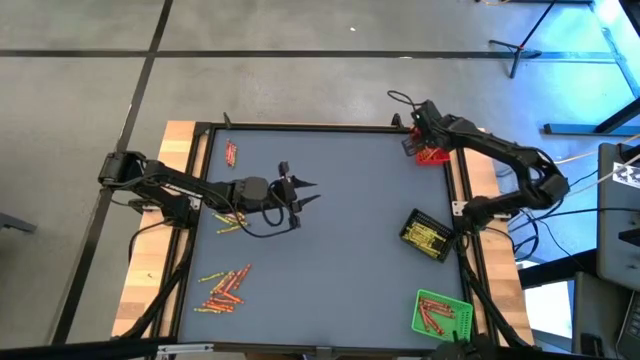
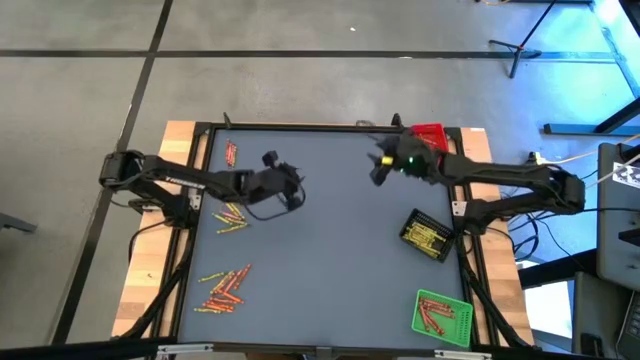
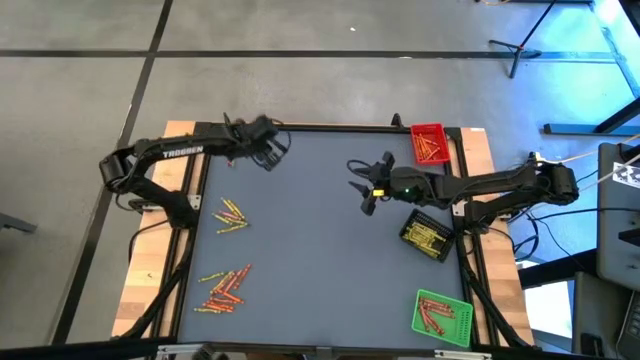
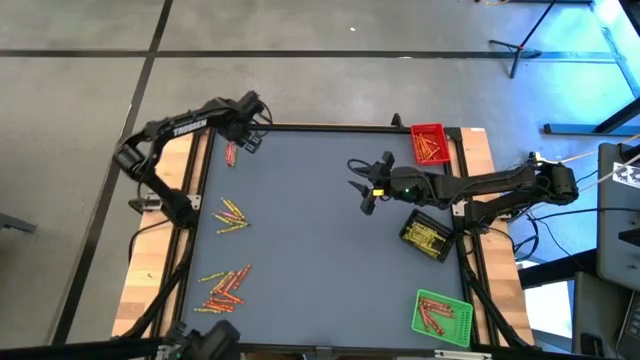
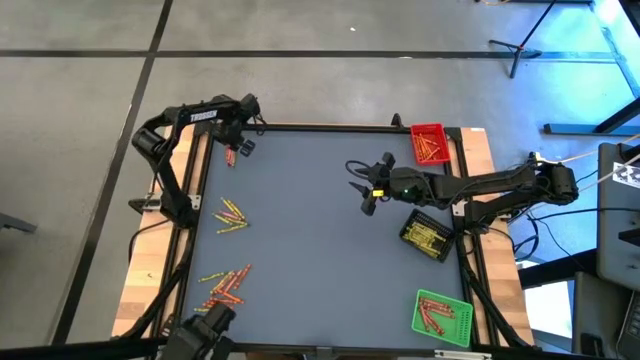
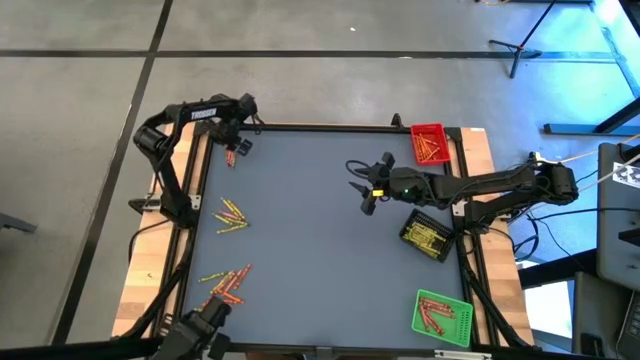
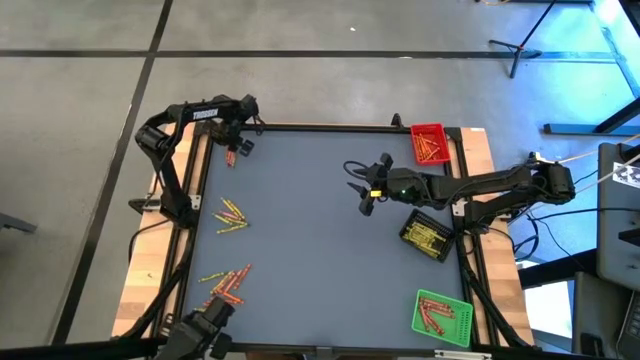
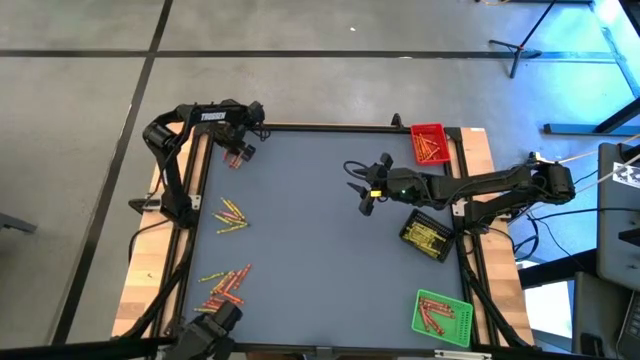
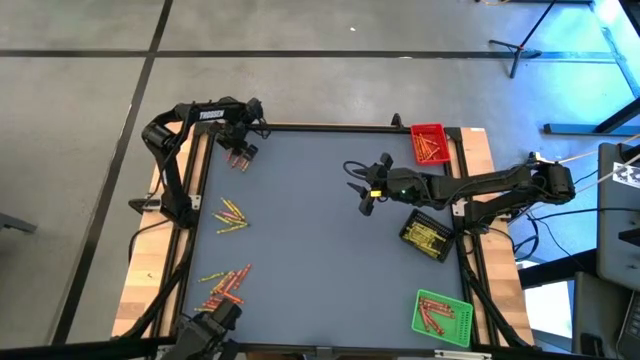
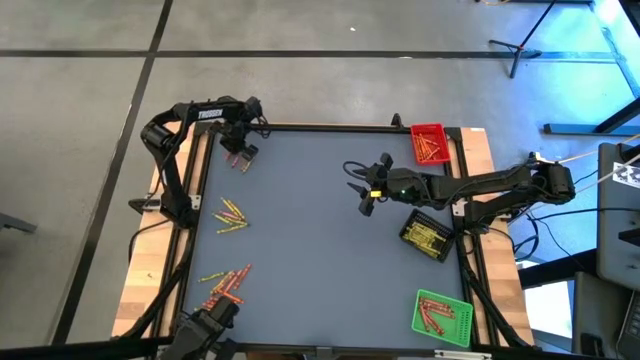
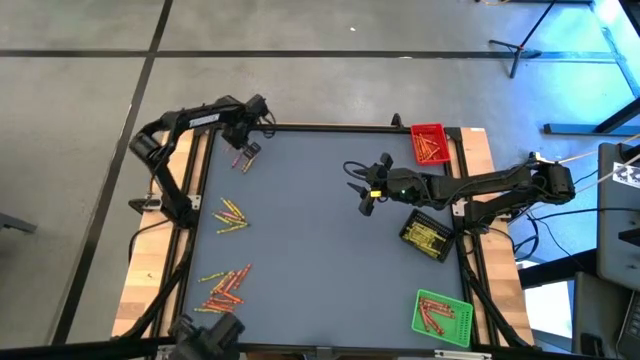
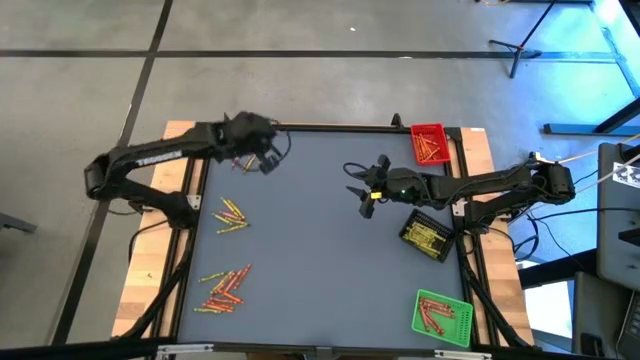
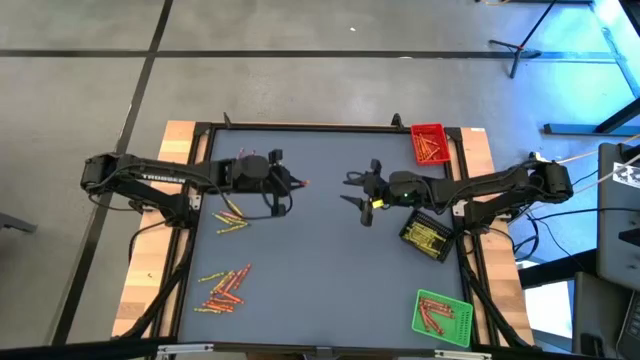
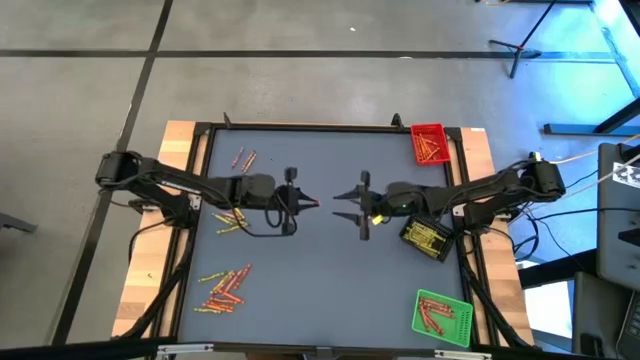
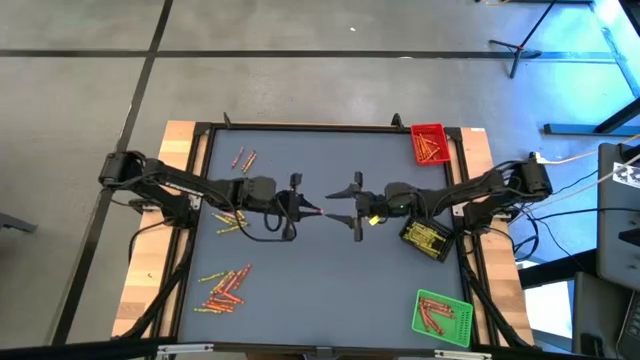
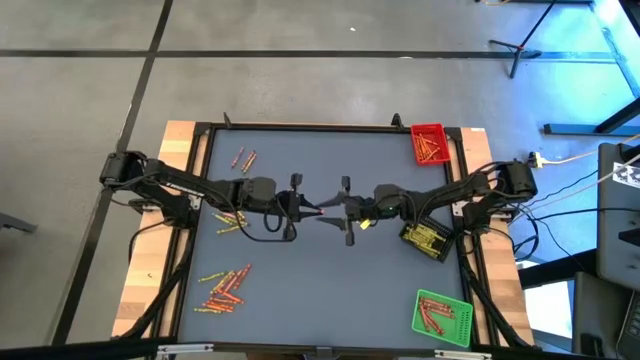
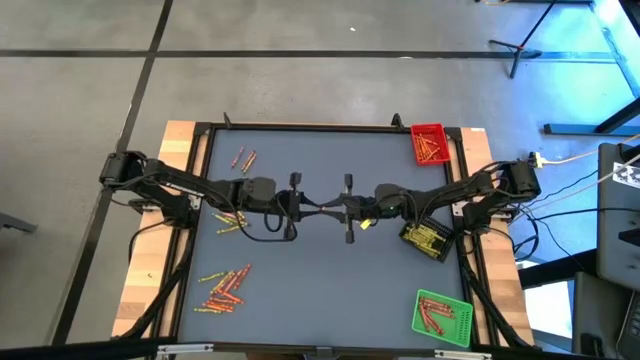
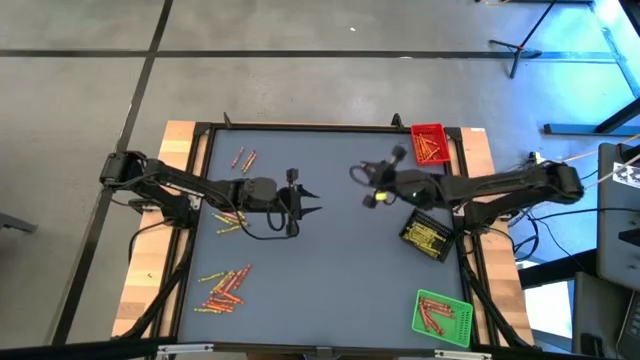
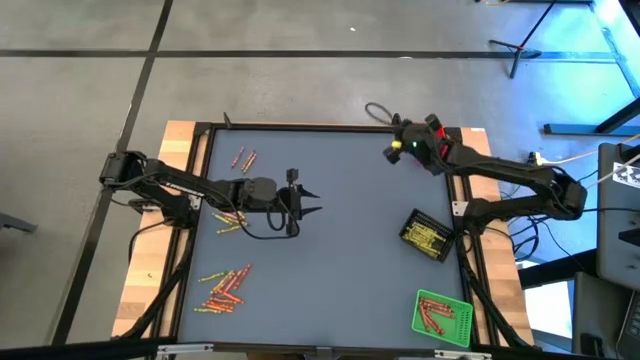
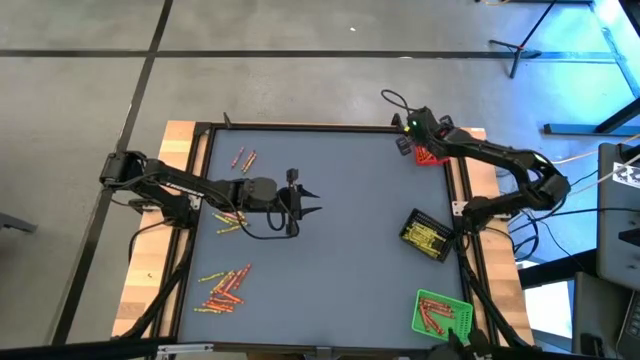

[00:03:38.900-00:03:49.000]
Task: Sort crayons
Put the orange crayon into the red basket

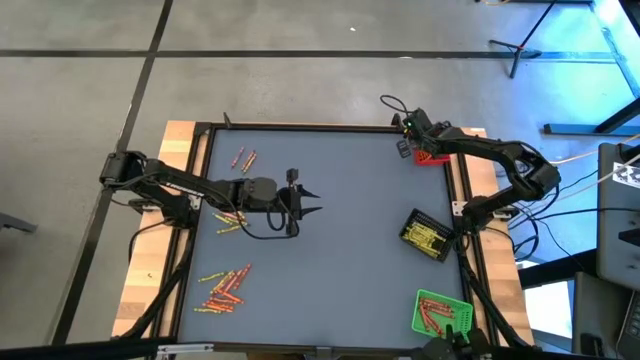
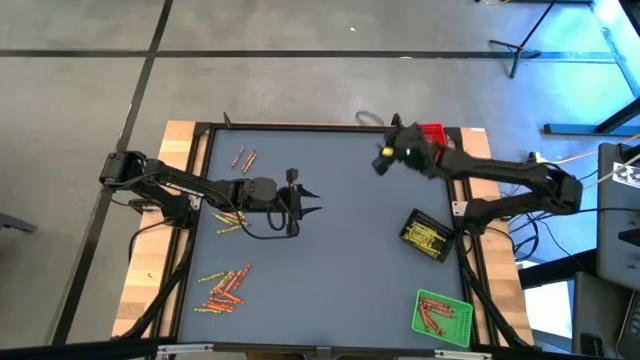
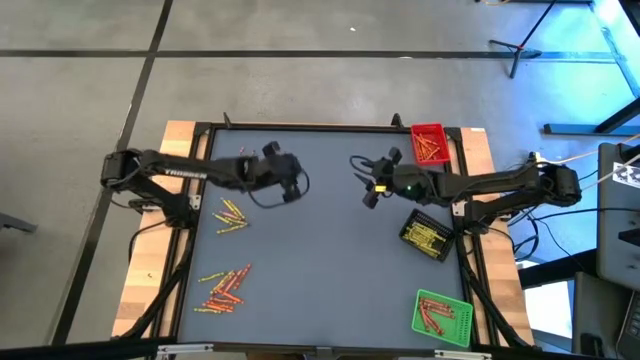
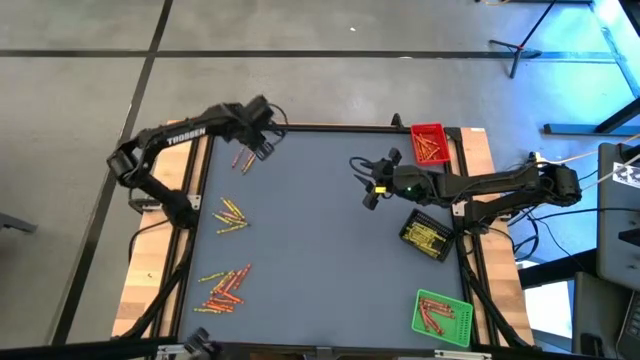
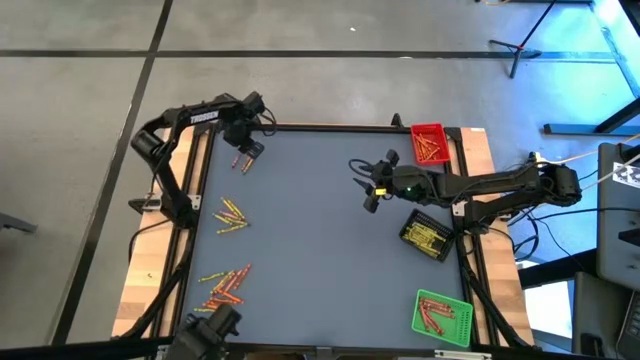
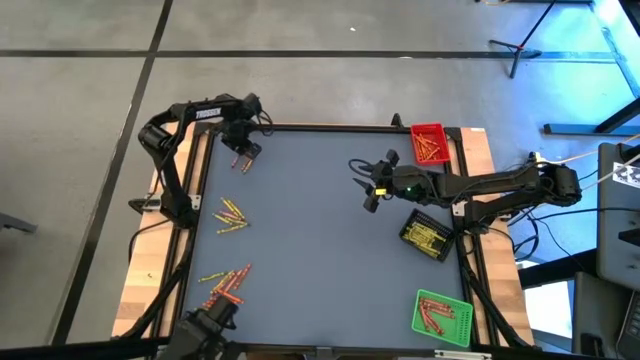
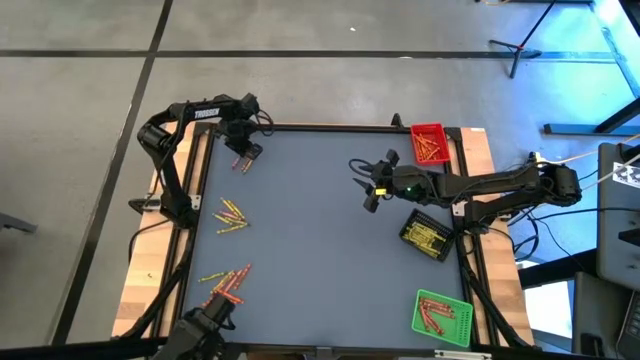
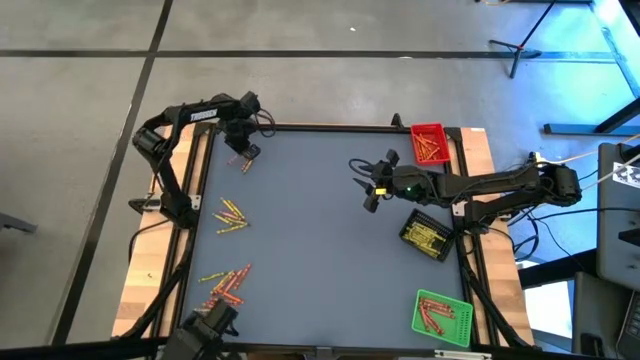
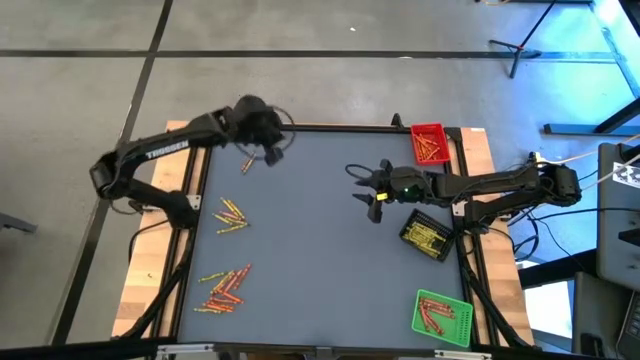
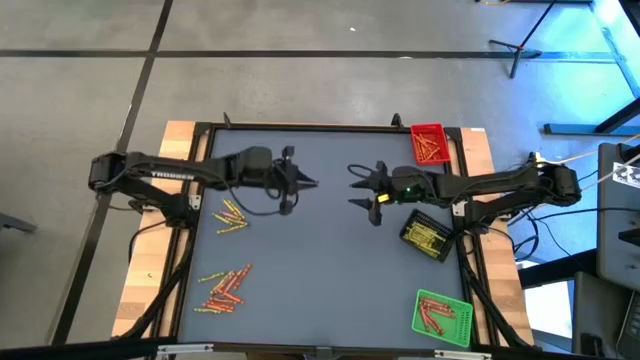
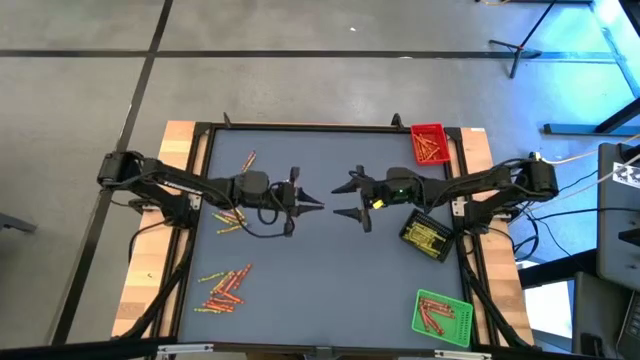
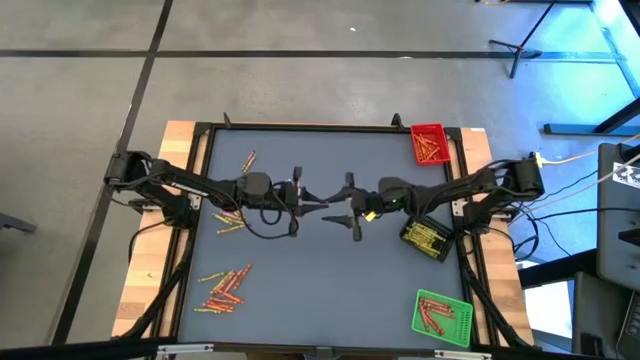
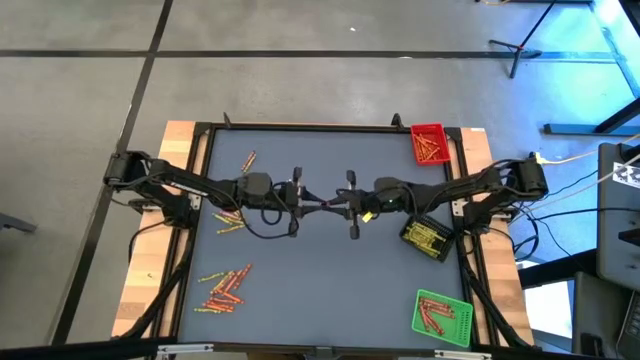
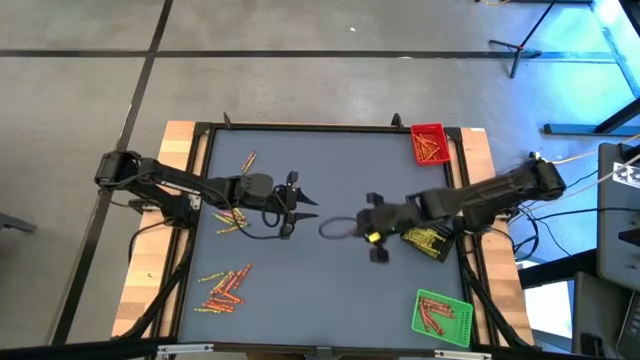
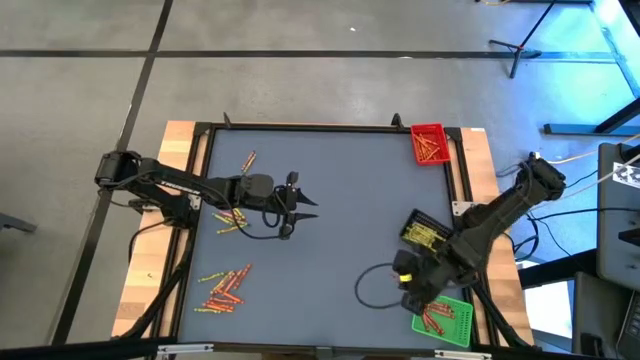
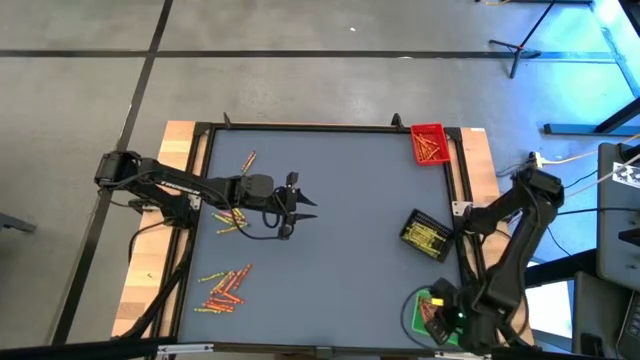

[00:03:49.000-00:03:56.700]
Put the red crayon into the green basket
